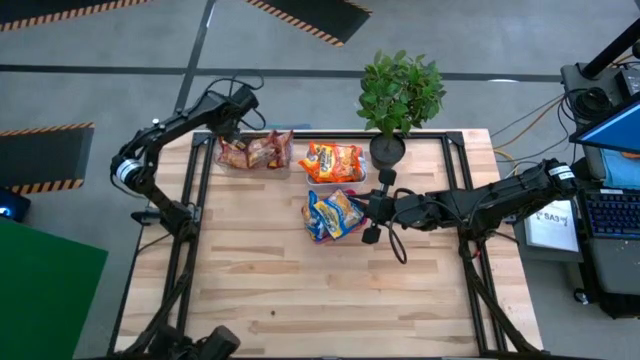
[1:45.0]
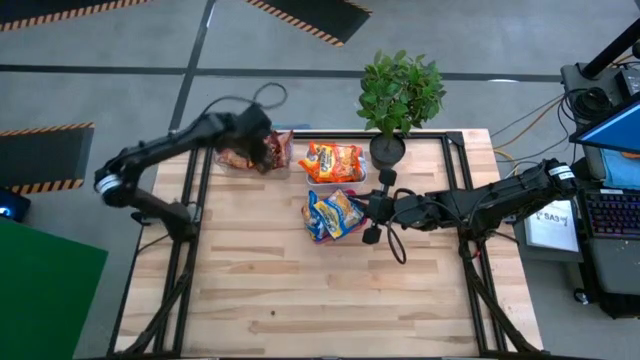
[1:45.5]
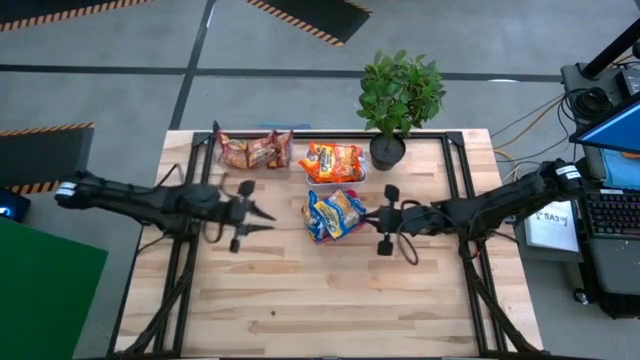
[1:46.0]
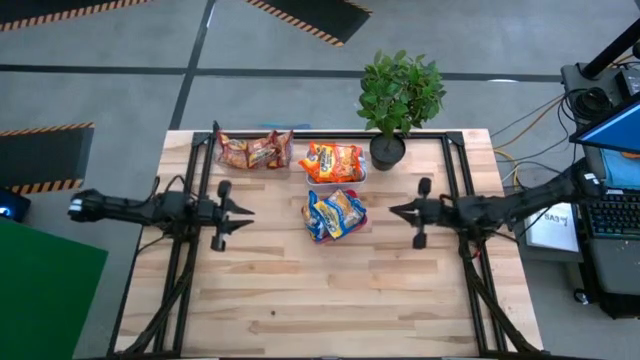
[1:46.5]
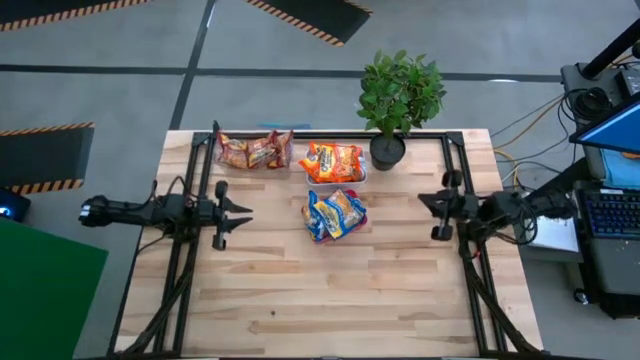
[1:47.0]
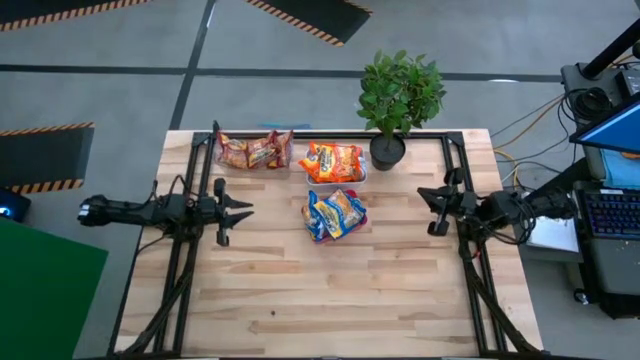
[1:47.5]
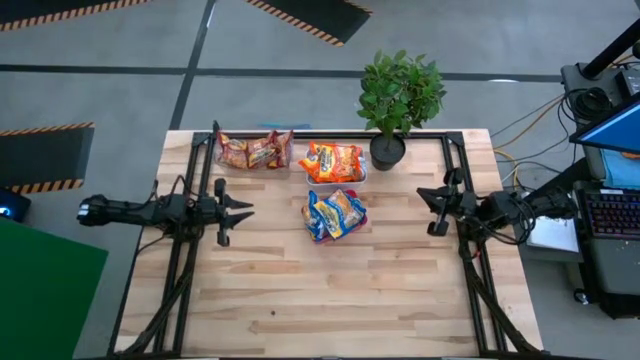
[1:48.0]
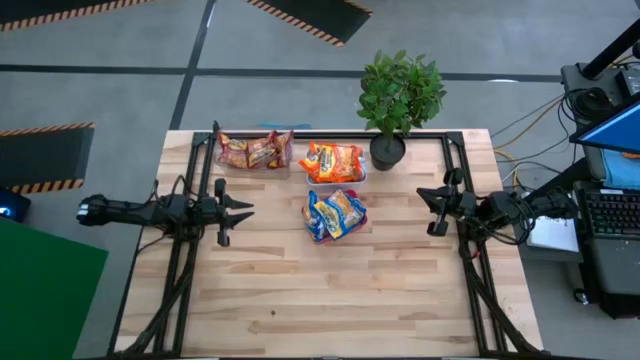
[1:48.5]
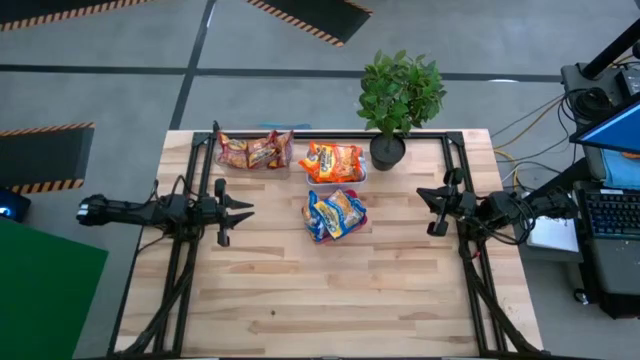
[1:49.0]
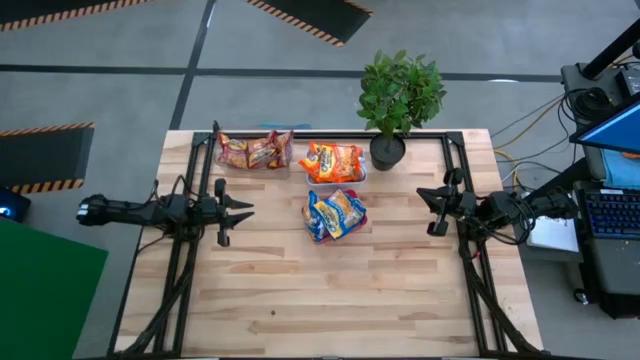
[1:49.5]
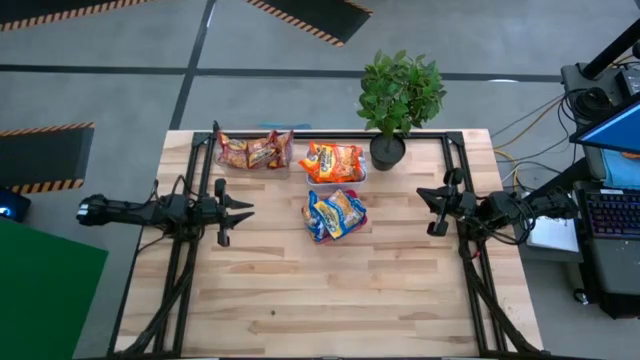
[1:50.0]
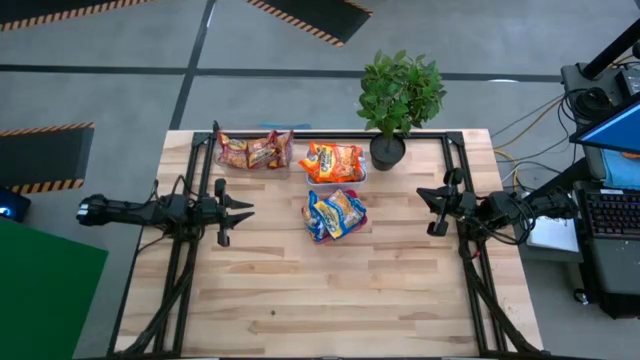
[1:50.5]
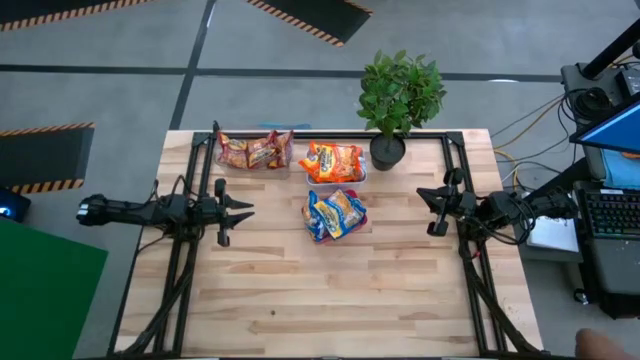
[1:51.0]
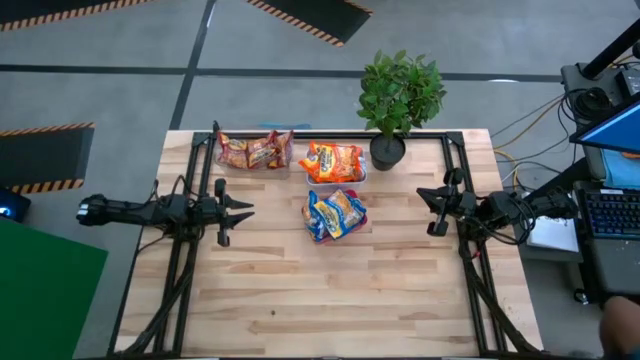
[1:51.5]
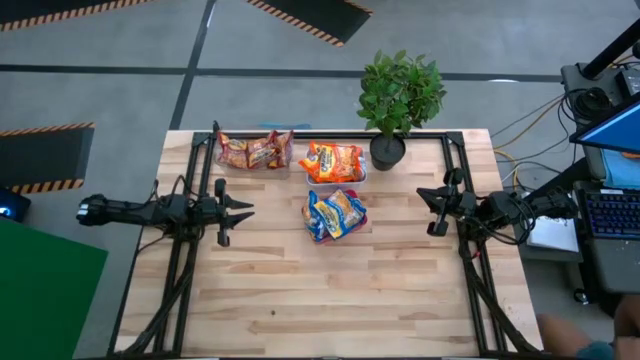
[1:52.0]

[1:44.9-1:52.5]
Task: Sort Maruchan noodles
Return to Home Position

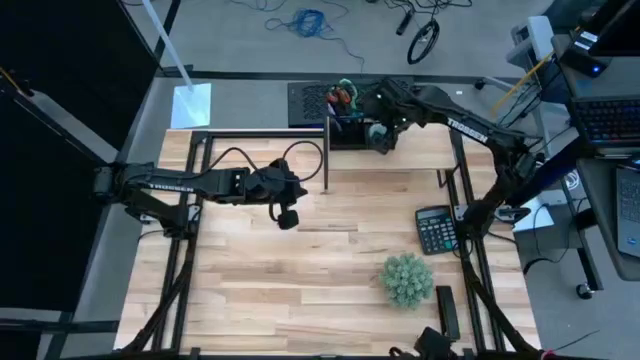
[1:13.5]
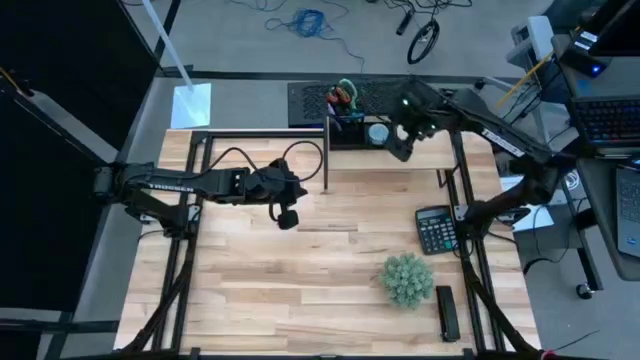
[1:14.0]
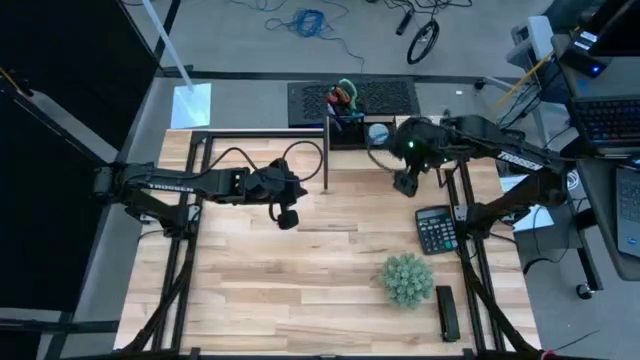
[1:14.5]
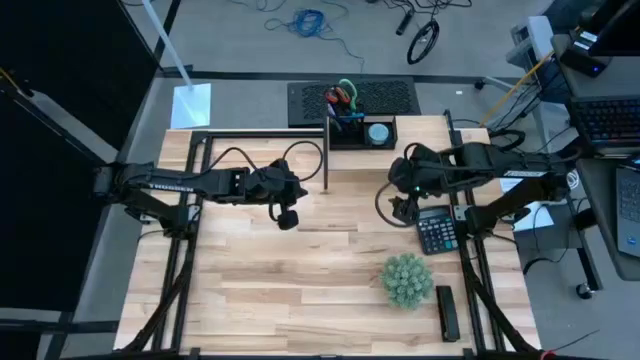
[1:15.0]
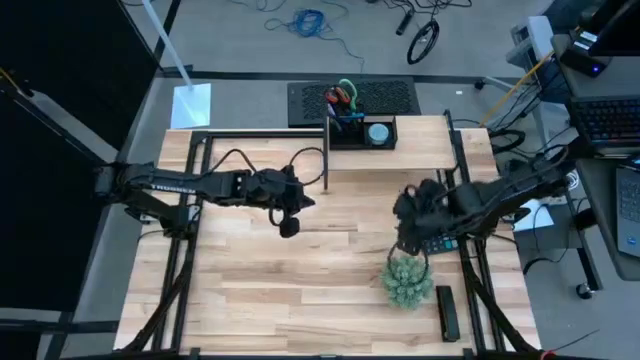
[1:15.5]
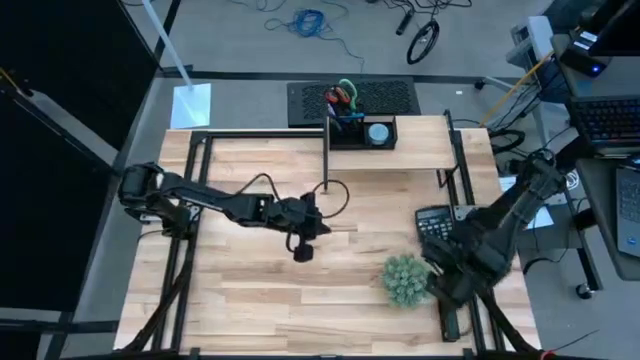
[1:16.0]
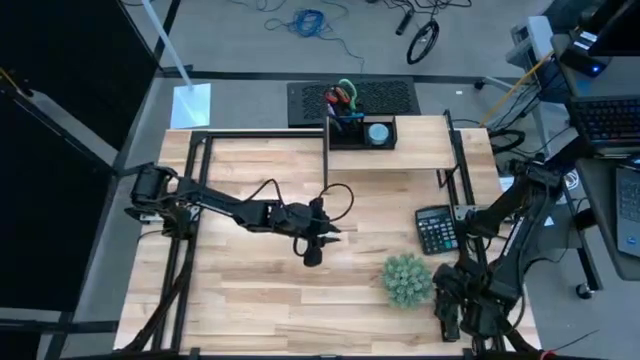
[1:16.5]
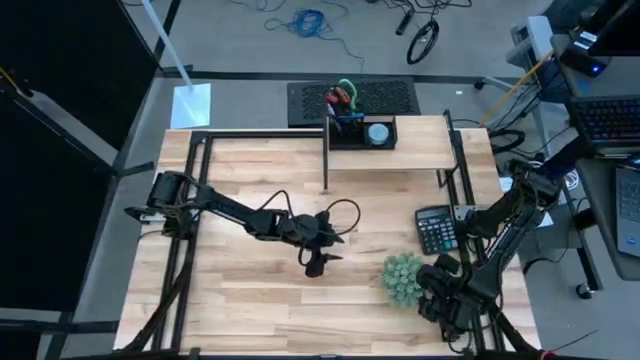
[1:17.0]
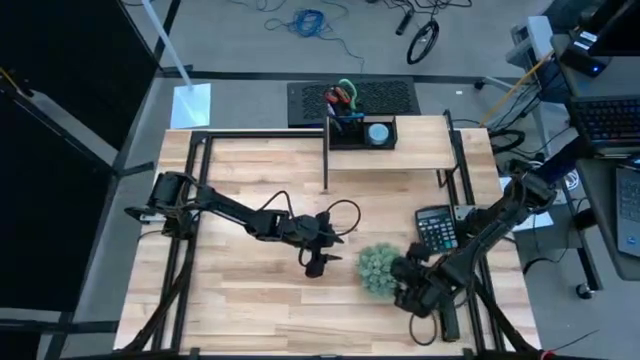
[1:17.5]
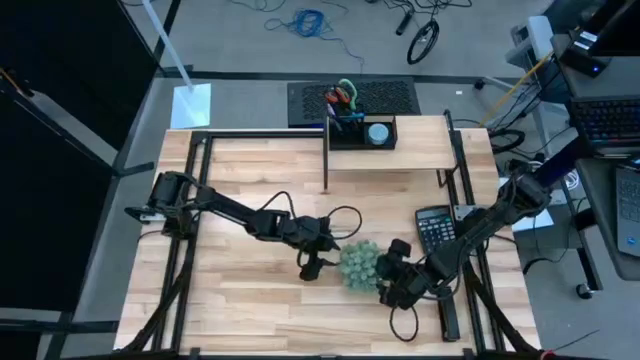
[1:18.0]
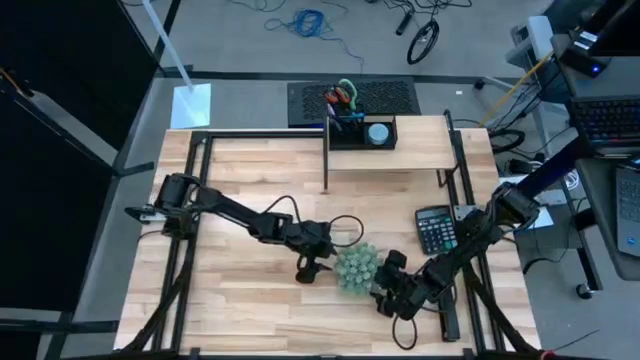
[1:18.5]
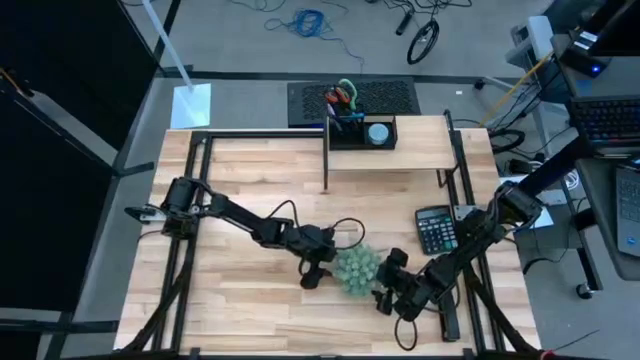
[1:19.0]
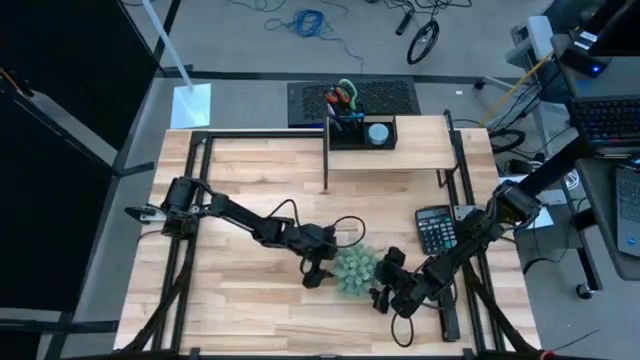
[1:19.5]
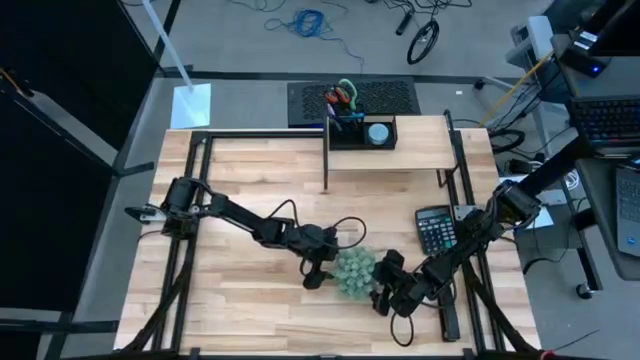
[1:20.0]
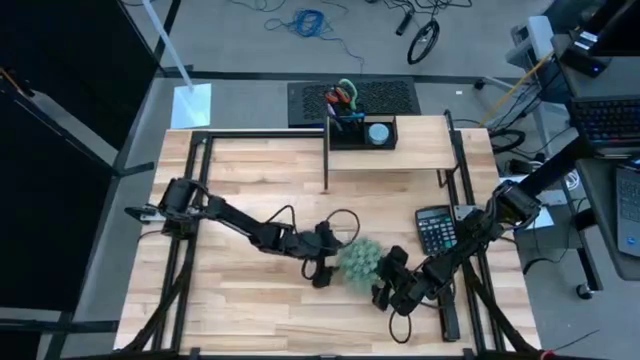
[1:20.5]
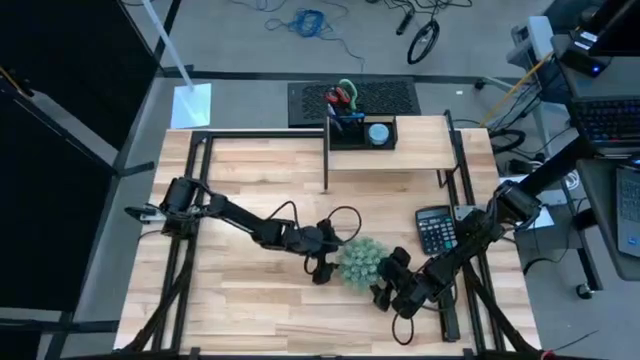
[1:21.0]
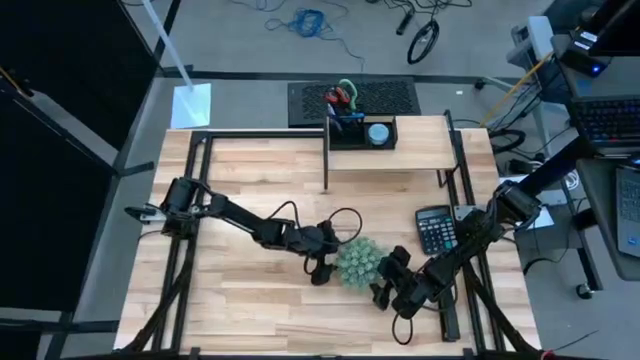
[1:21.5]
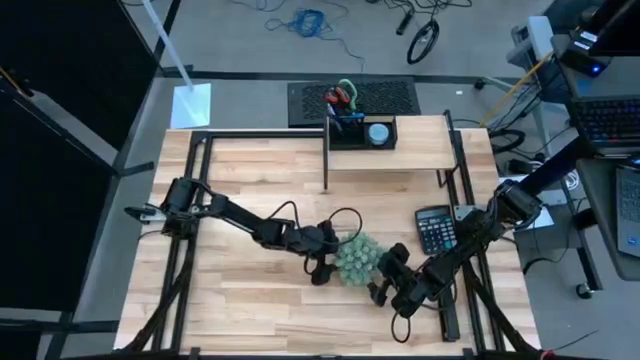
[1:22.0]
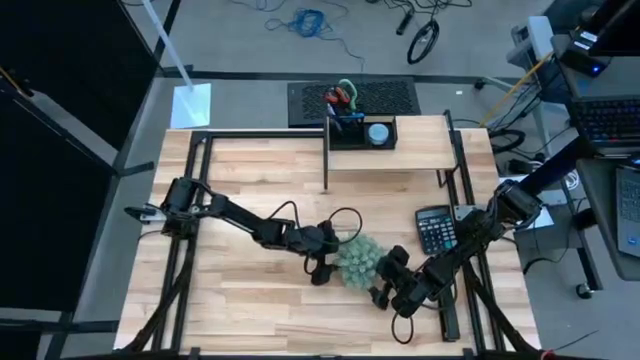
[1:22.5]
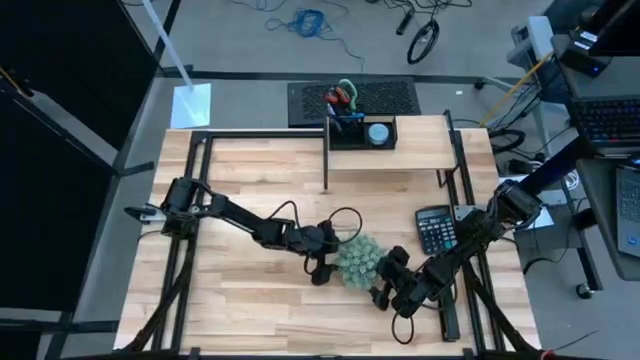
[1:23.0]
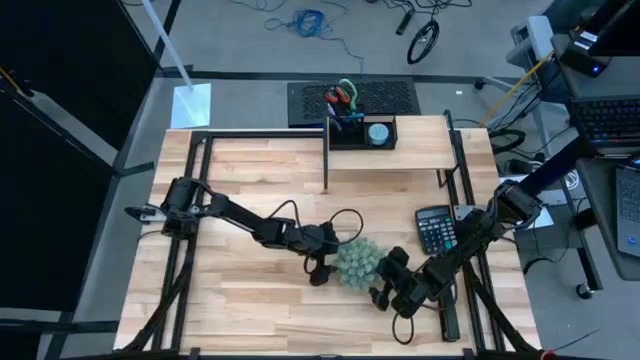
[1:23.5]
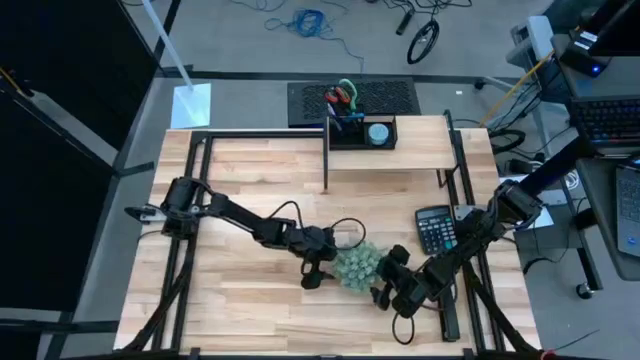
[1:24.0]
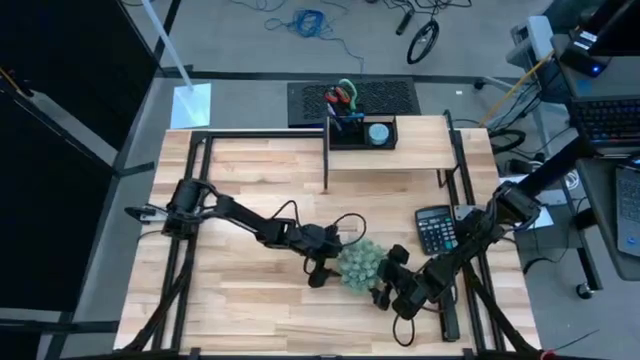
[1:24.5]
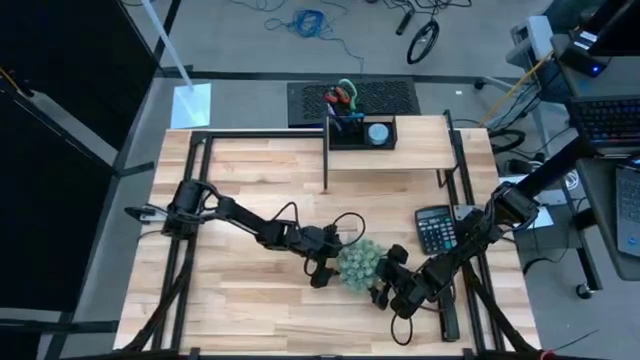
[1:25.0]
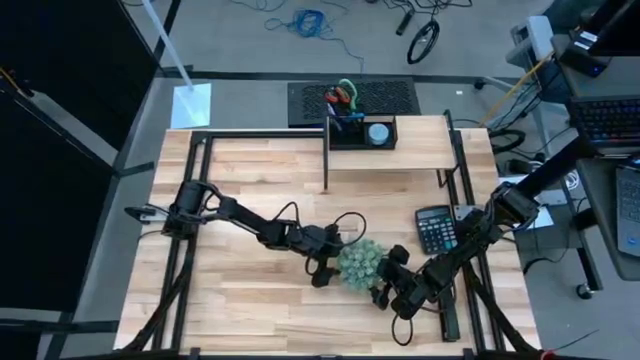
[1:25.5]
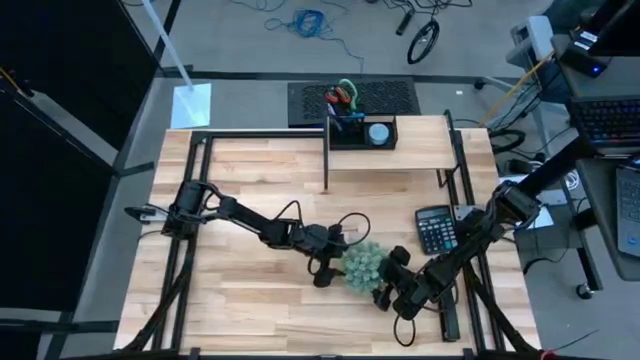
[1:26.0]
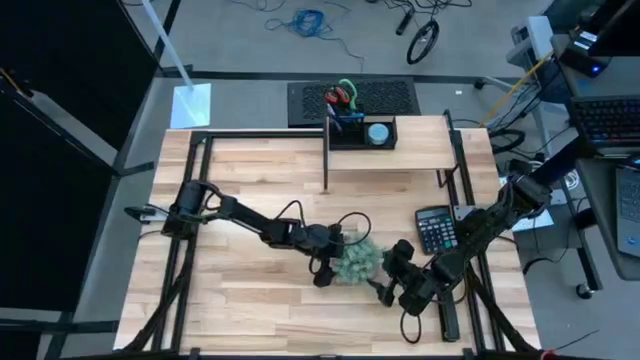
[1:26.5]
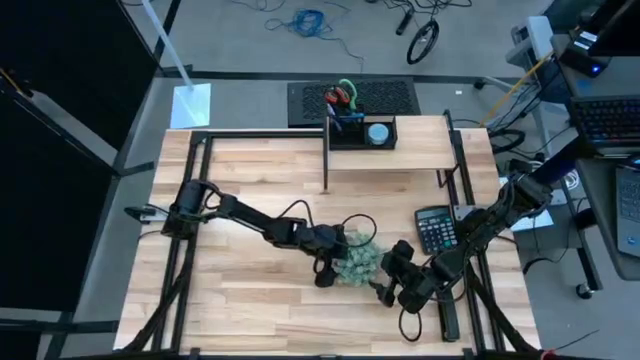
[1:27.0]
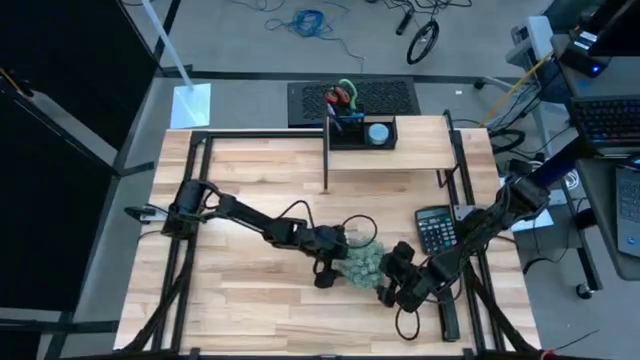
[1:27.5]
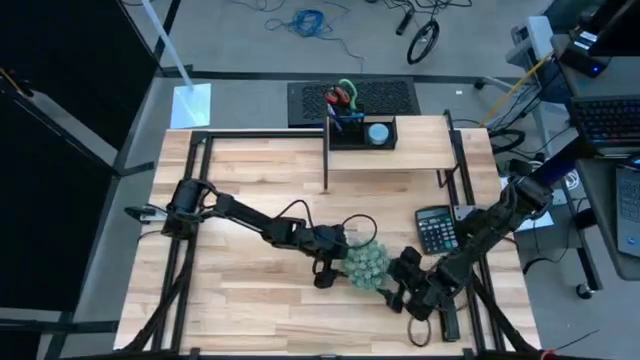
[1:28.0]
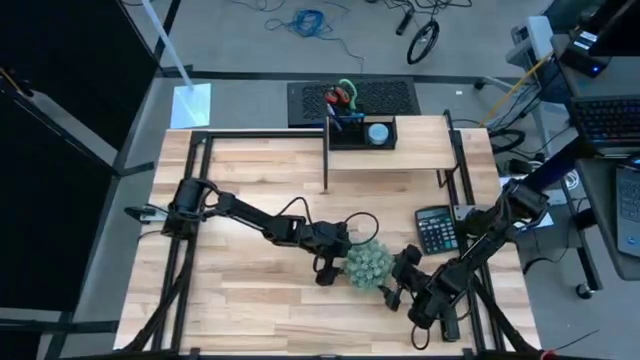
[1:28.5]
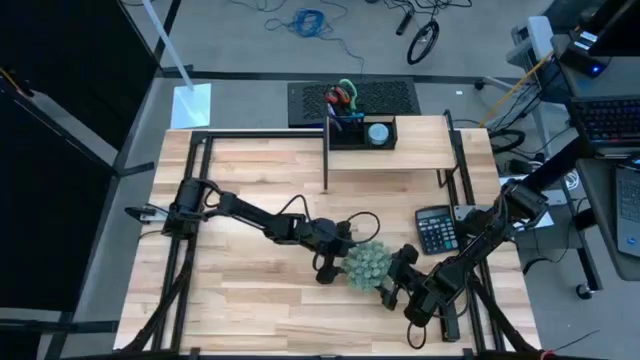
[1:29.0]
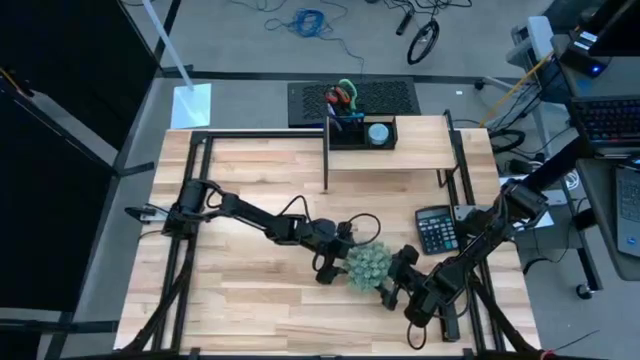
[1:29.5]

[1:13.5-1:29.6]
Task: Pick and place office supplies into organizer
Put the gray patterned vase plant on the wooden shelf
